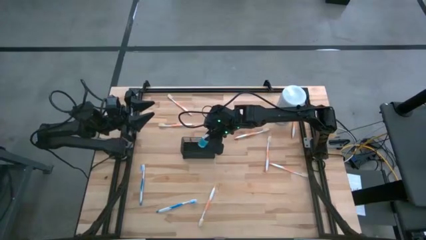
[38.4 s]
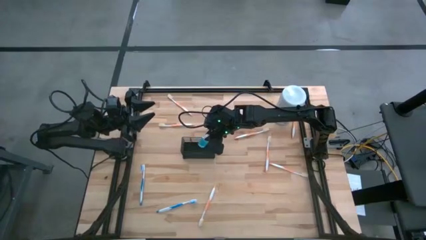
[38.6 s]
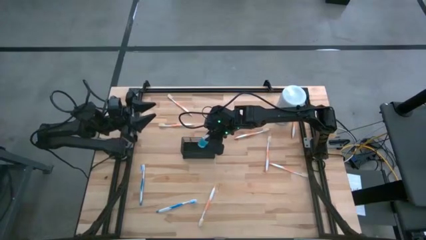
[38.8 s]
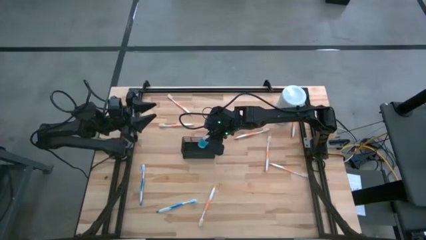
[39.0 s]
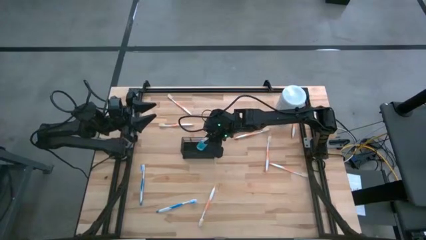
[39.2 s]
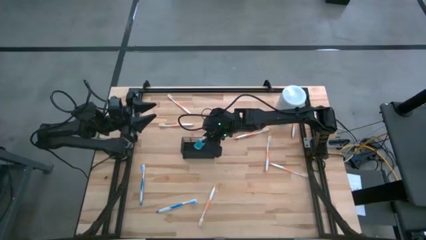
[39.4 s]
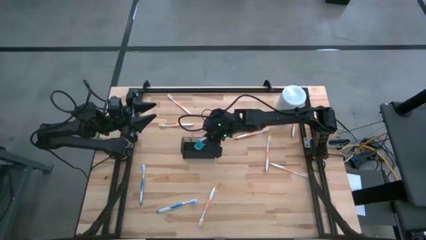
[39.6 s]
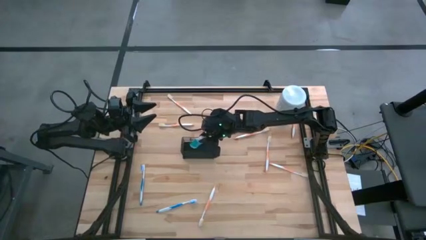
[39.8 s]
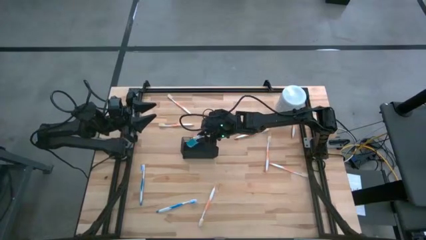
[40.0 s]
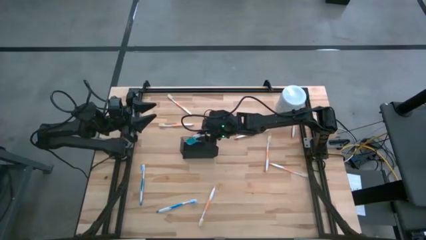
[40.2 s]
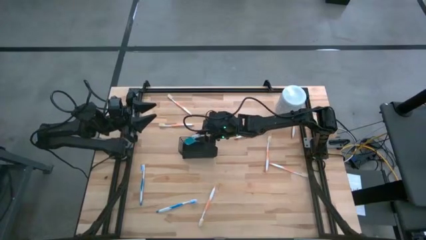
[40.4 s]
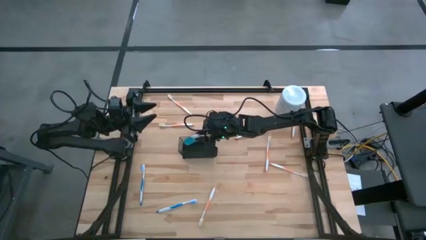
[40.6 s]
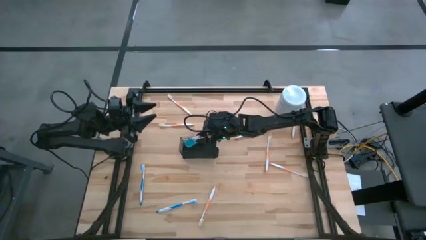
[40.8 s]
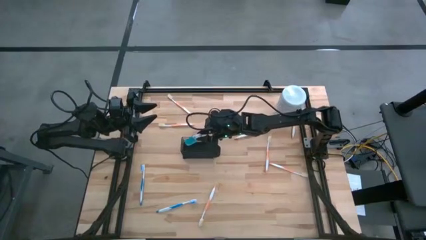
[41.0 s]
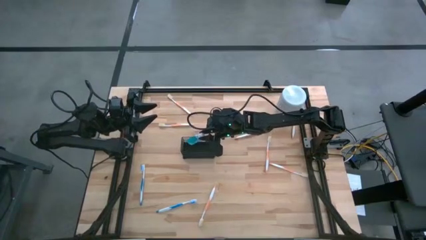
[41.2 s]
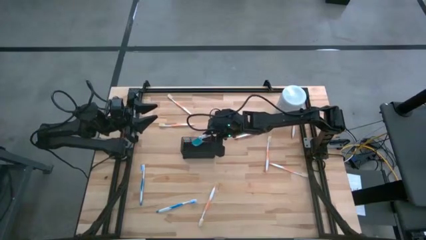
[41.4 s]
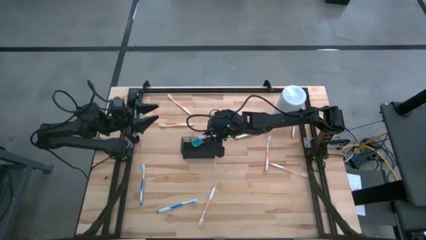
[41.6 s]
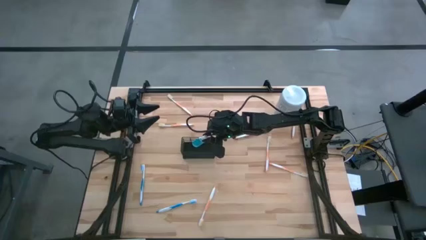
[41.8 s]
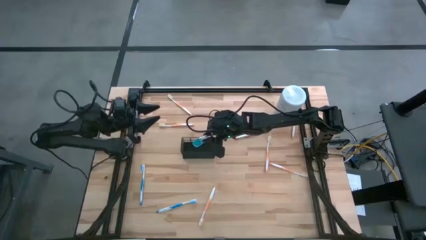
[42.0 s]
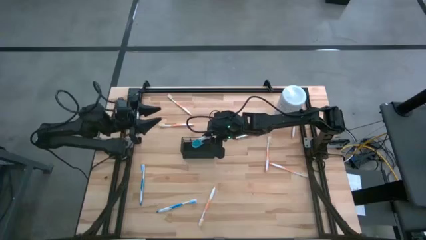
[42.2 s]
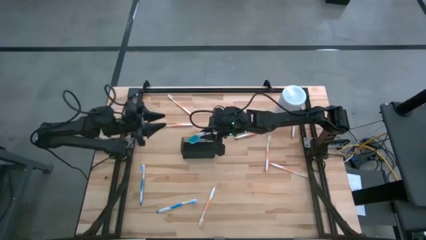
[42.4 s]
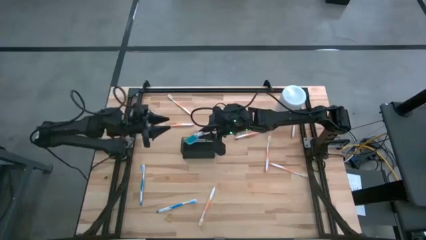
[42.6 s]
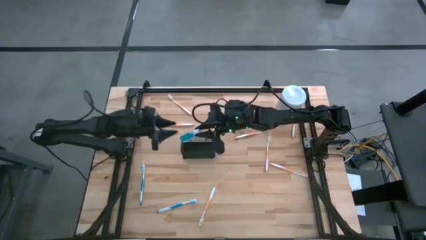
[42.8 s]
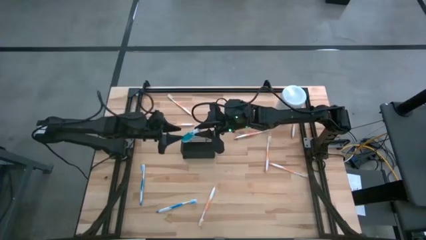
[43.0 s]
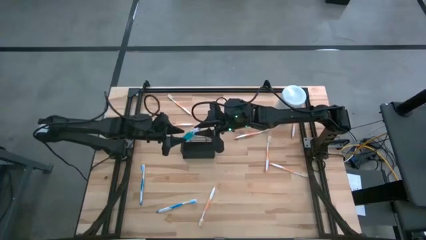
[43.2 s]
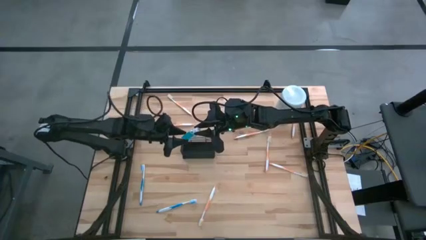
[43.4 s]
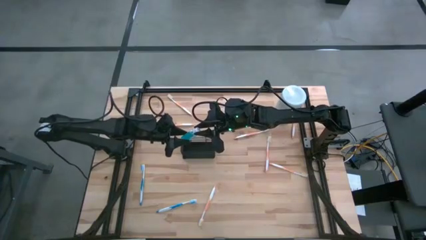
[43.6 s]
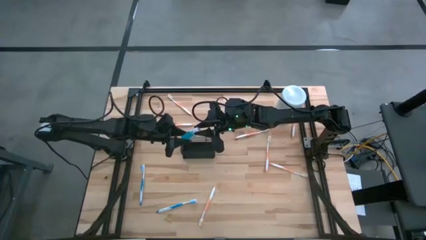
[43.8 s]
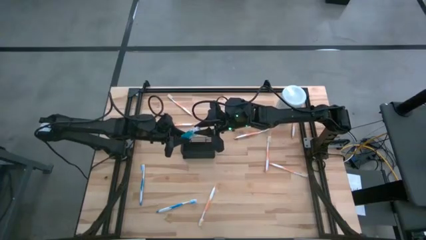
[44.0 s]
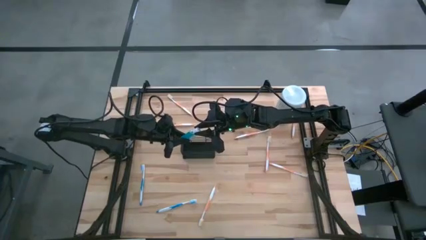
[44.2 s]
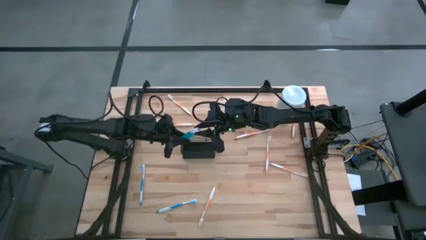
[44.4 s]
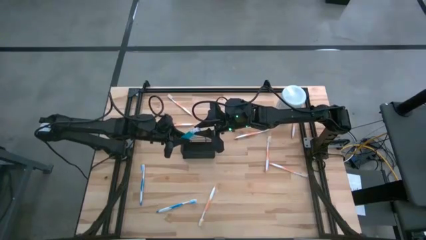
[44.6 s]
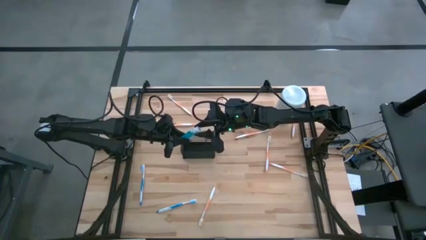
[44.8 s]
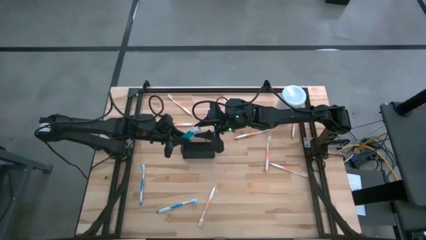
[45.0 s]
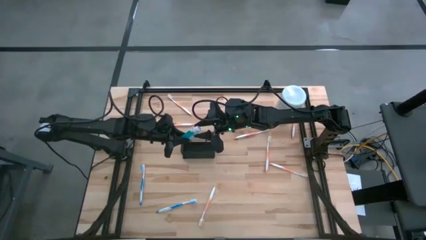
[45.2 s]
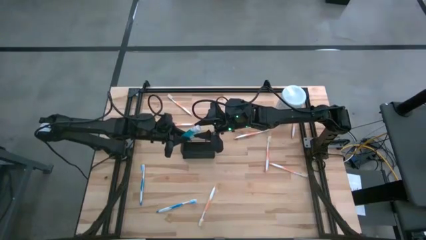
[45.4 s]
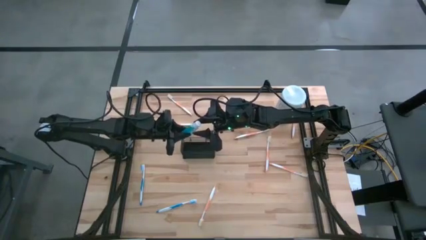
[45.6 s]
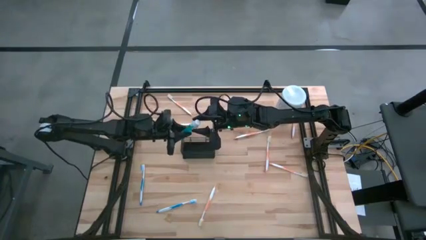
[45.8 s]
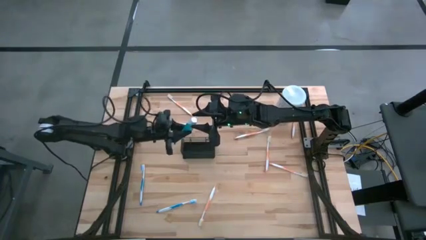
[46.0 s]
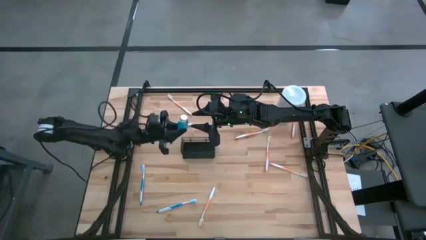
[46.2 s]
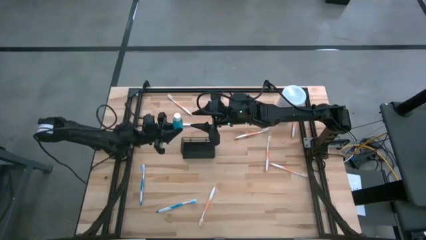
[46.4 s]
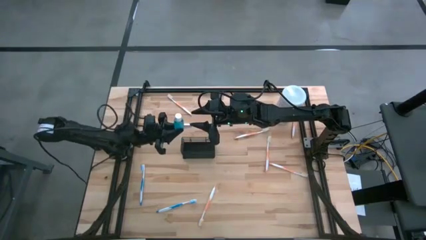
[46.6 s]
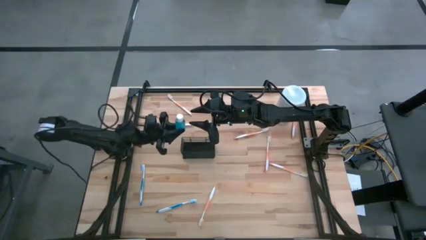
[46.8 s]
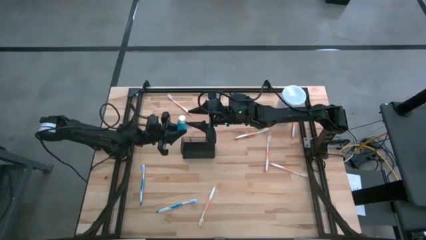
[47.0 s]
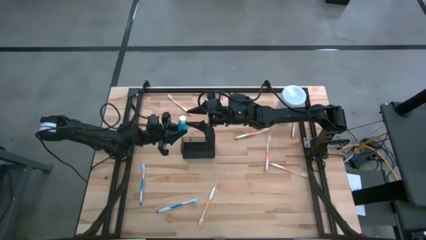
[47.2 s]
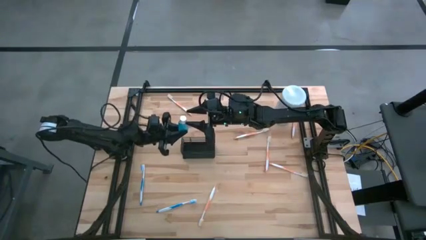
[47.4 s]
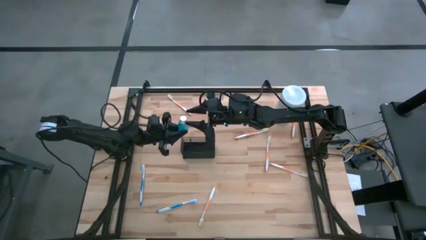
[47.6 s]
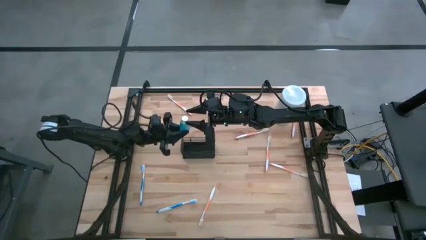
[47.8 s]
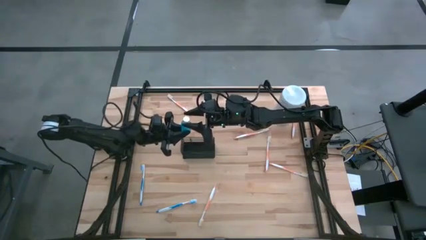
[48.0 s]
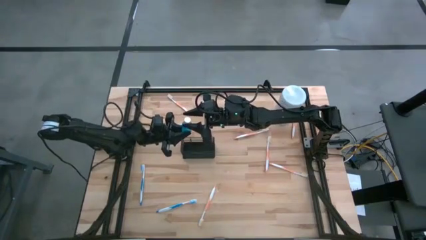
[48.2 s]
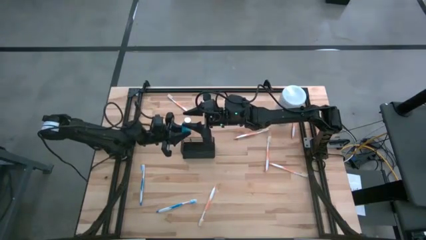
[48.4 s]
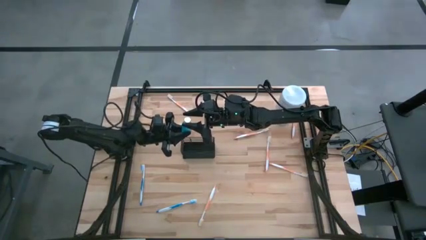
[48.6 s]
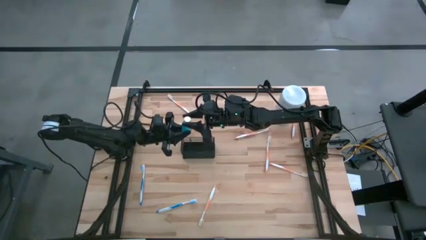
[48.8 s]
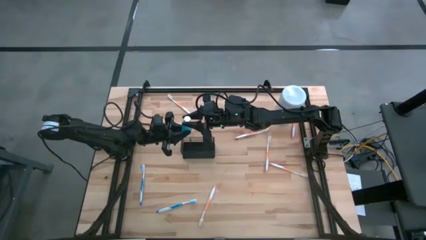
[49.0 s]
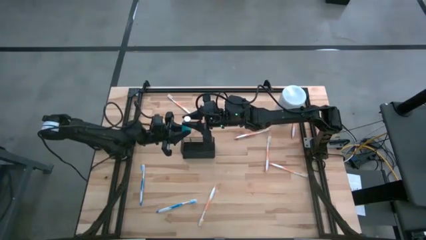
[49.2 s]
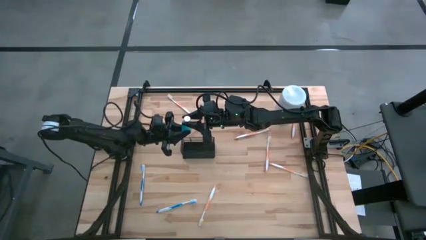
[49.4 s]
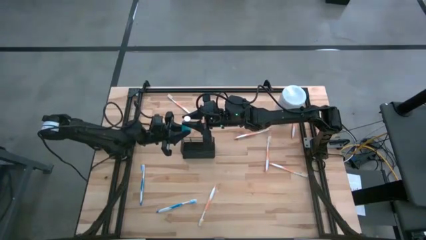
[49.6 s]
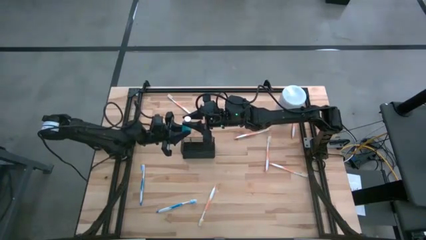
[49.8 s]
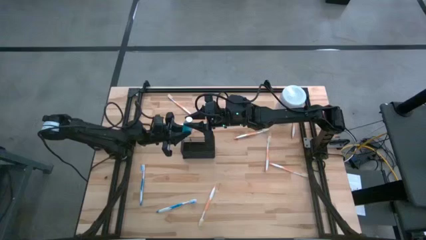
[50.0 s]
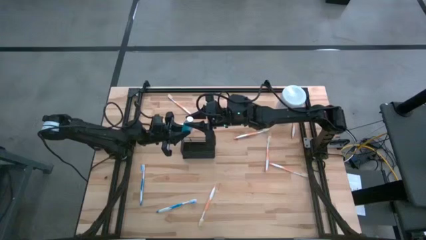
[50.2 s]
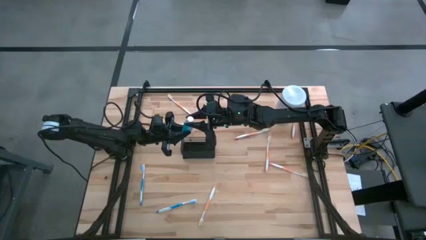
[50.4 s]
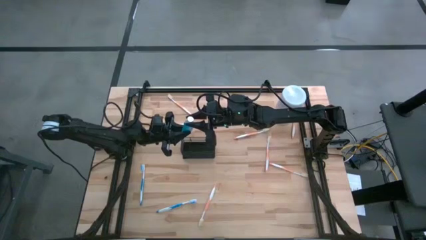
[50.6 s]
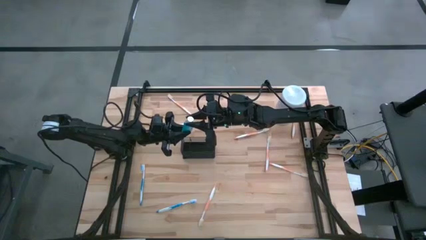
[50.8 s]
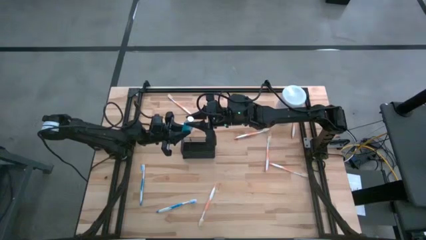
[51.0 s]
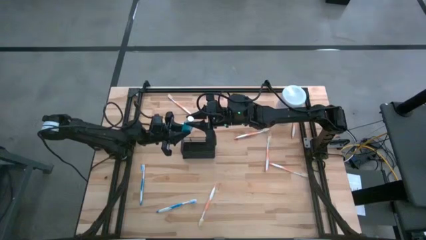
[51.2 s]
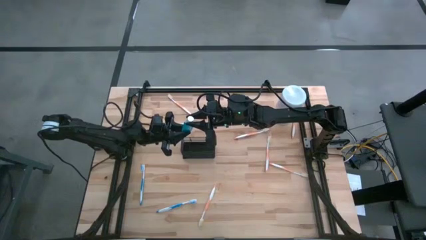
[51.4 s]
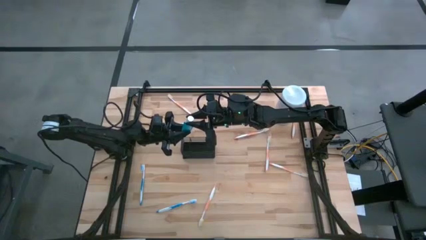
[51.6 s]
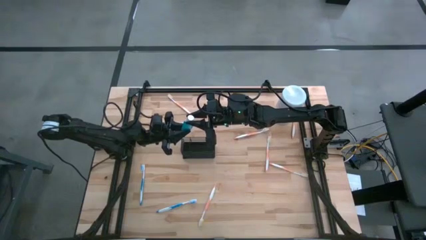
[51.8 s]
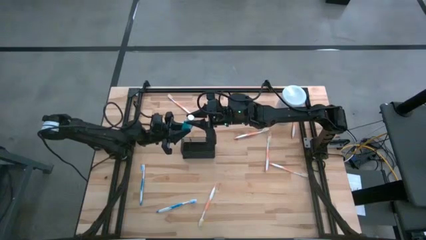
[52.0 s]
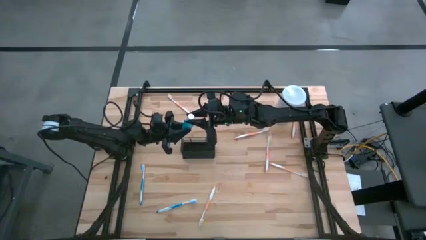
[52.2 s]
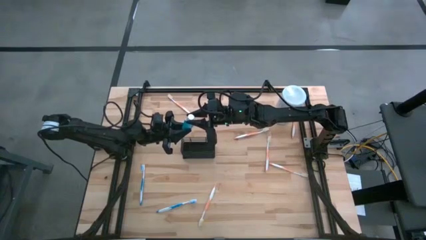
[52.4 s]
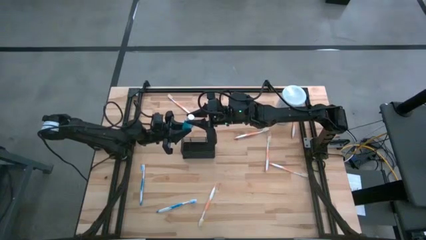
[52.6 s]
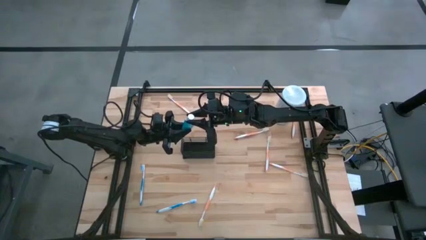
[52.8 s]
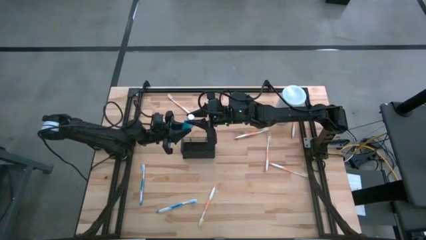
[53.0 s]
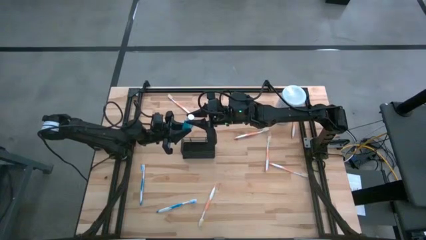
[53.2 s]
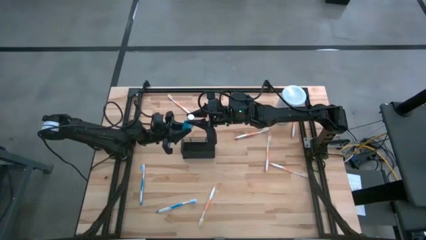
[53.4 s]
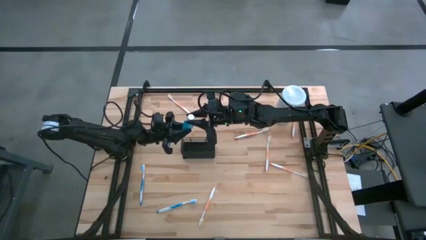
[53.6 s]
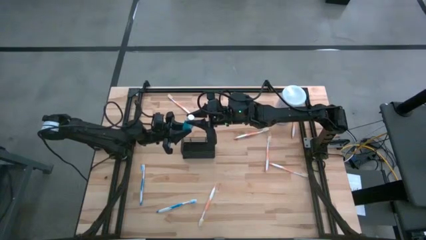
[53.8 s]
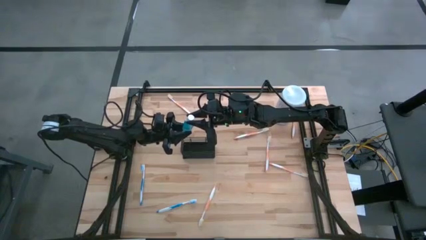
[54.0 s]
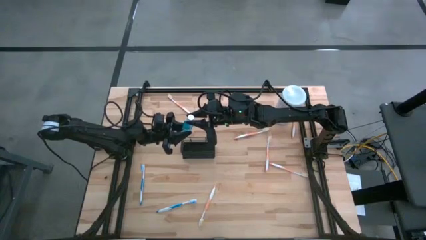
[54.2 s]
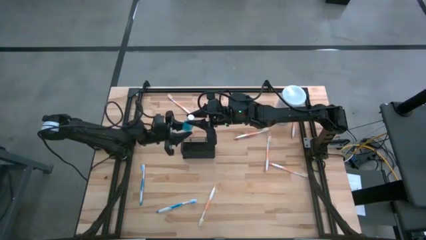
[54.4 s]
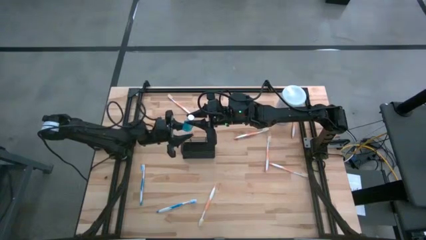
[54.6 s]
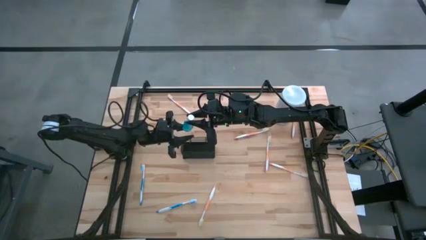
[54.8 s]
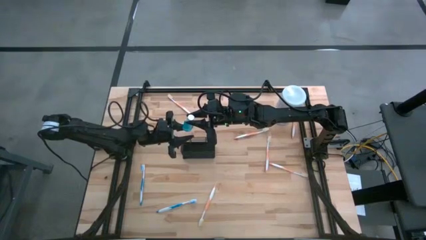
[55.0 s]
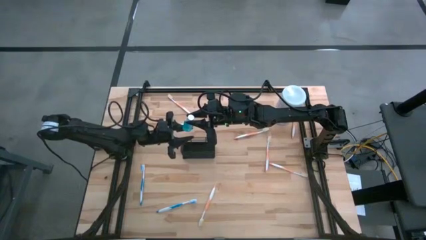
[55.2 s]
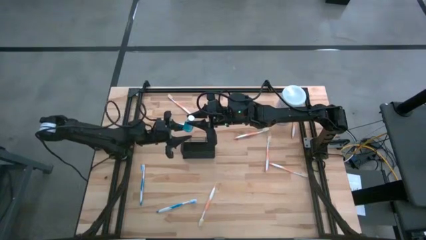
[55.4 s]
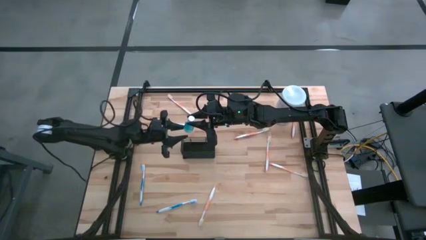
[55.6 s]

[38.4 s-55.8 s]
Task: Pick & Place toothbrushing station
Put the blue mouthwash into the middle section of the wire organizer
